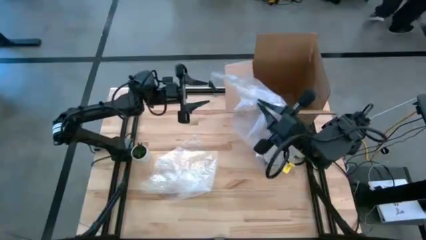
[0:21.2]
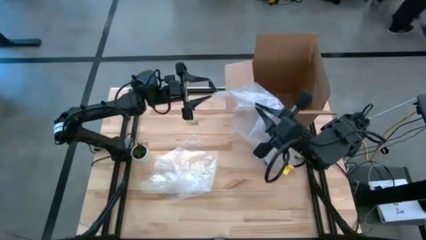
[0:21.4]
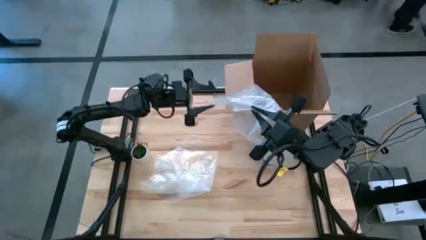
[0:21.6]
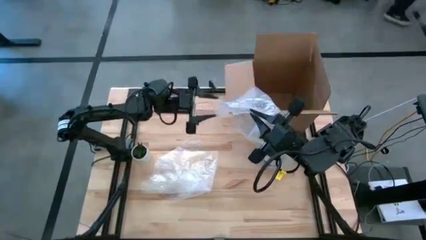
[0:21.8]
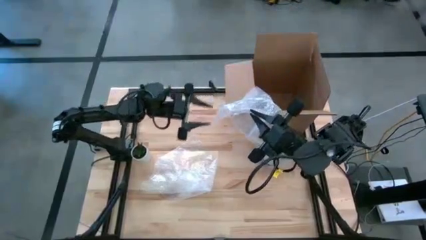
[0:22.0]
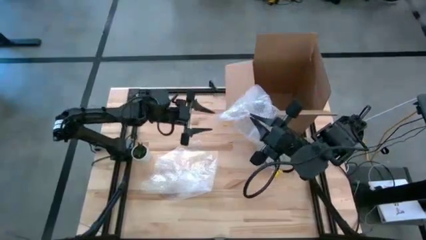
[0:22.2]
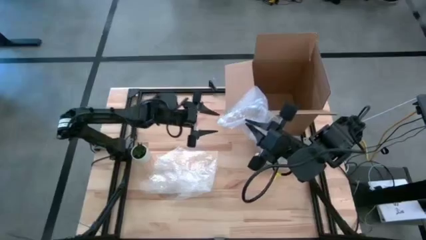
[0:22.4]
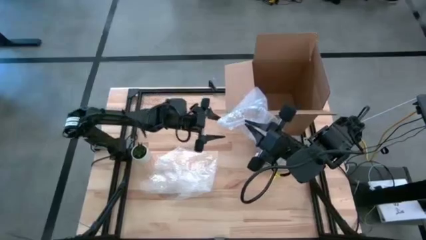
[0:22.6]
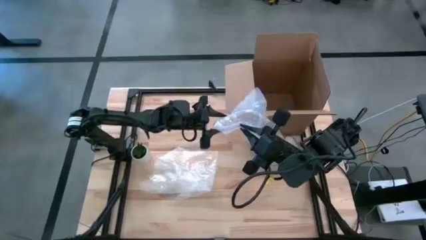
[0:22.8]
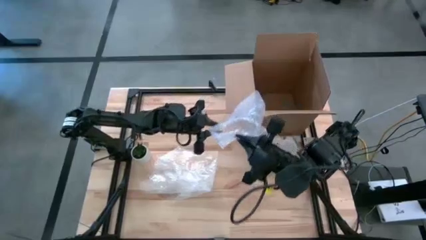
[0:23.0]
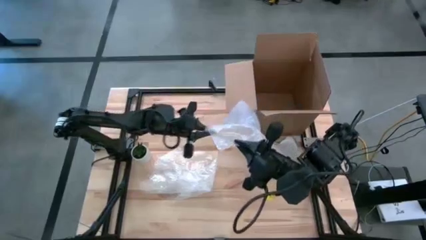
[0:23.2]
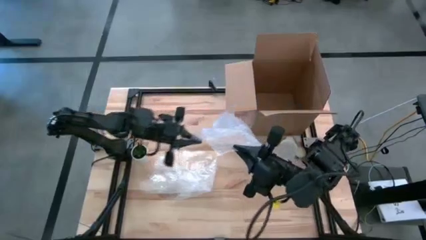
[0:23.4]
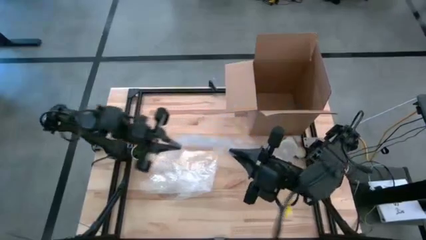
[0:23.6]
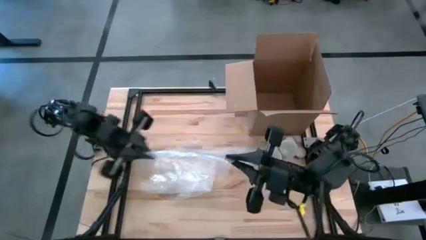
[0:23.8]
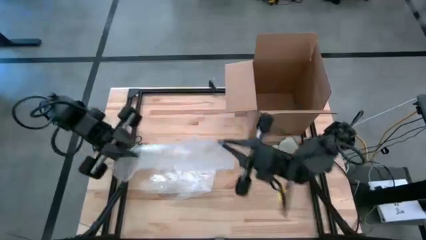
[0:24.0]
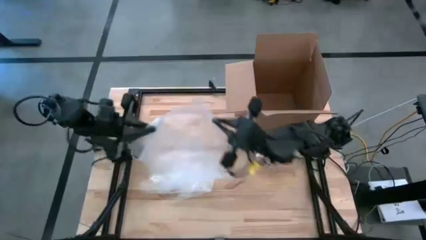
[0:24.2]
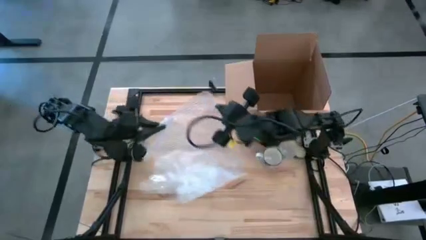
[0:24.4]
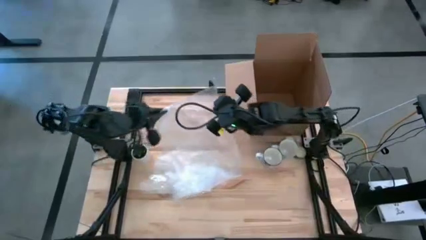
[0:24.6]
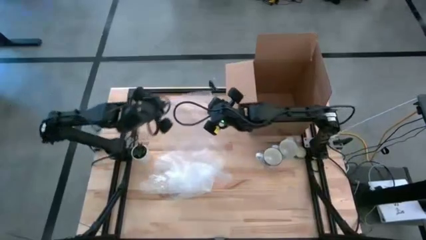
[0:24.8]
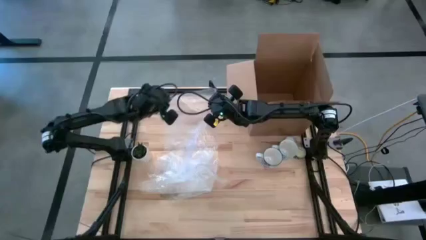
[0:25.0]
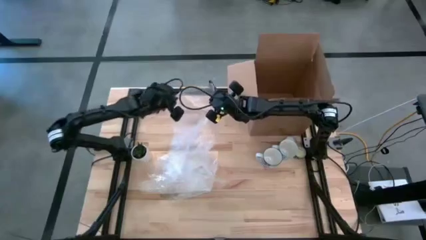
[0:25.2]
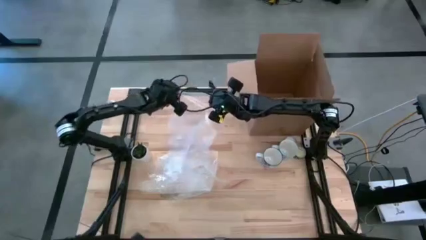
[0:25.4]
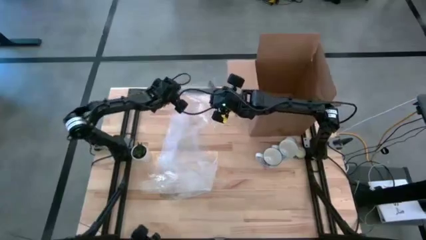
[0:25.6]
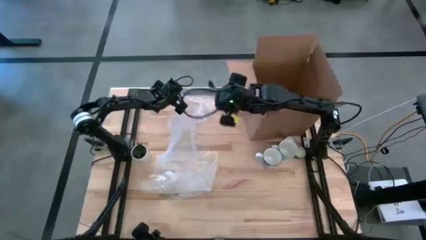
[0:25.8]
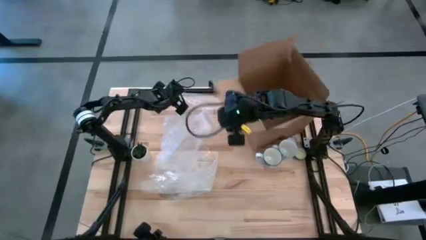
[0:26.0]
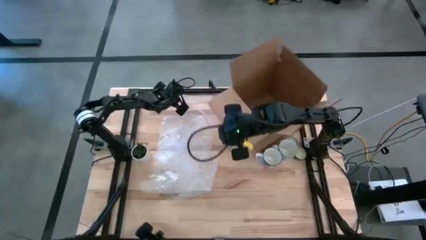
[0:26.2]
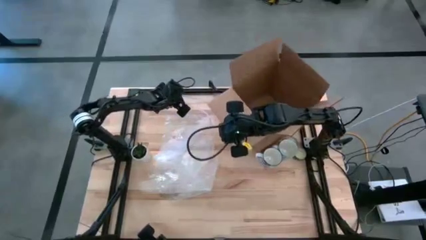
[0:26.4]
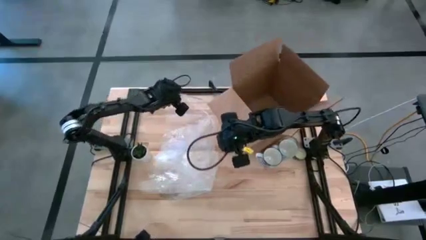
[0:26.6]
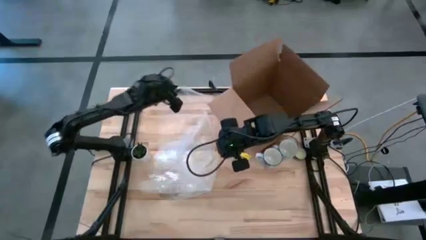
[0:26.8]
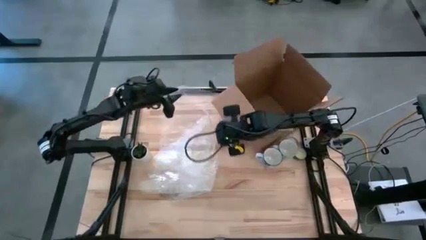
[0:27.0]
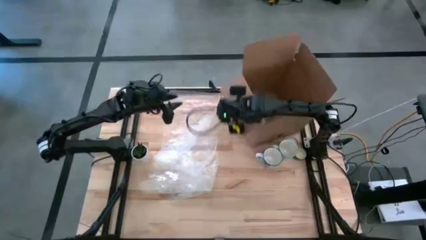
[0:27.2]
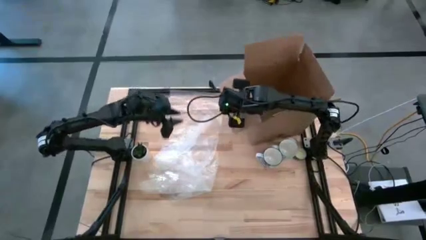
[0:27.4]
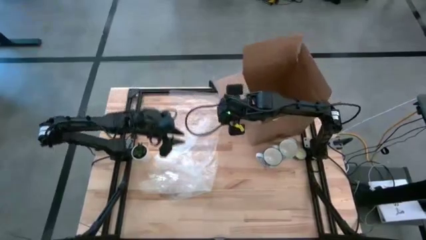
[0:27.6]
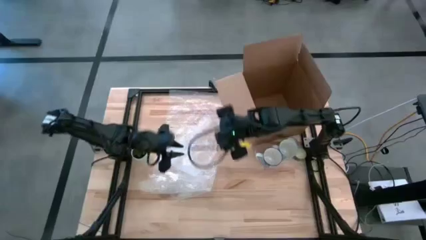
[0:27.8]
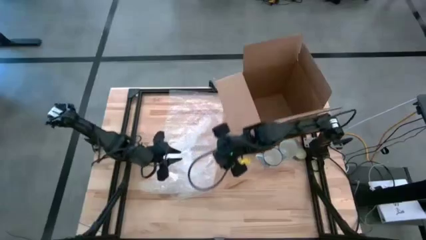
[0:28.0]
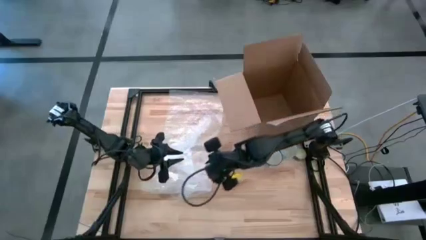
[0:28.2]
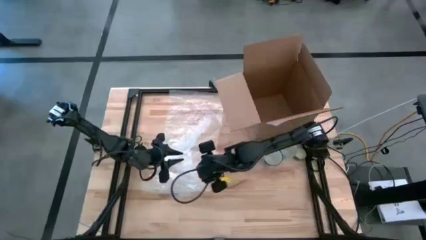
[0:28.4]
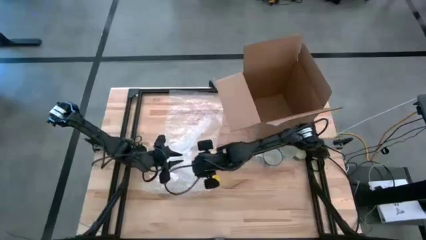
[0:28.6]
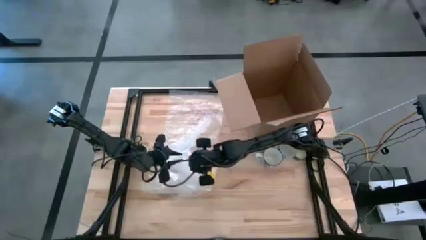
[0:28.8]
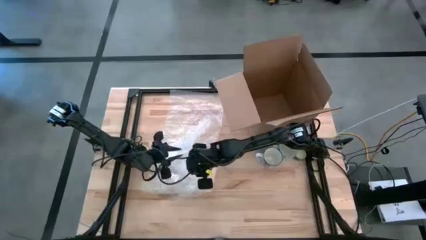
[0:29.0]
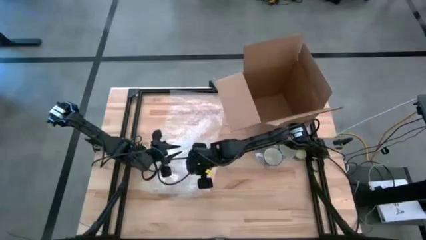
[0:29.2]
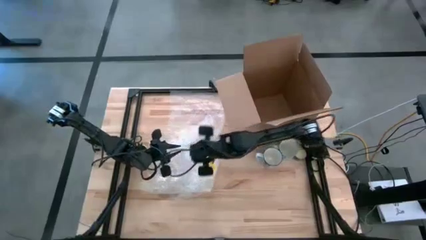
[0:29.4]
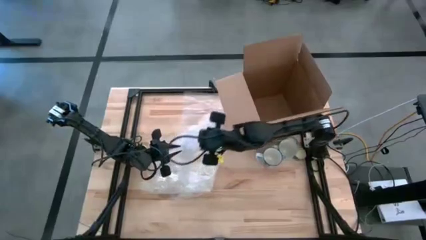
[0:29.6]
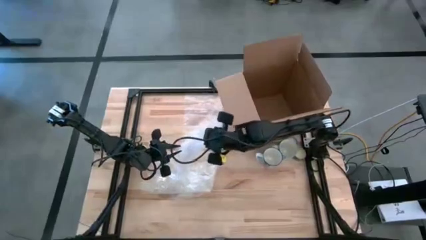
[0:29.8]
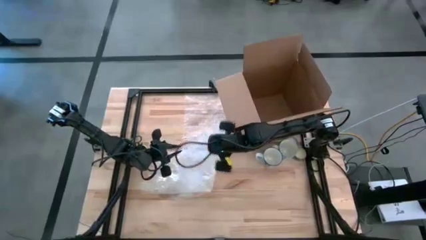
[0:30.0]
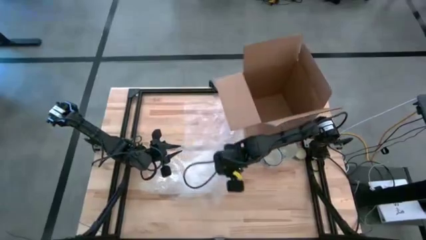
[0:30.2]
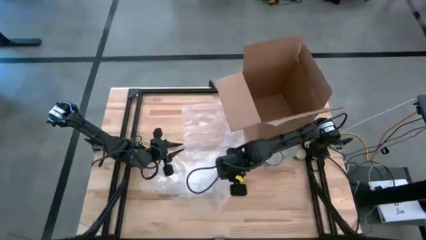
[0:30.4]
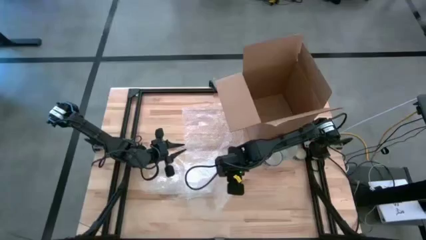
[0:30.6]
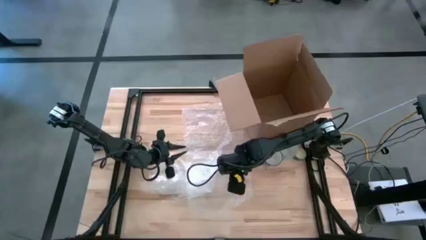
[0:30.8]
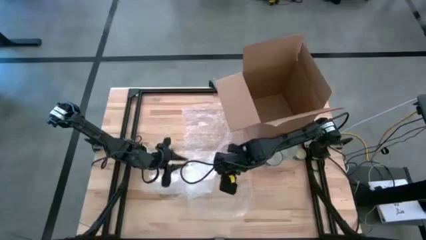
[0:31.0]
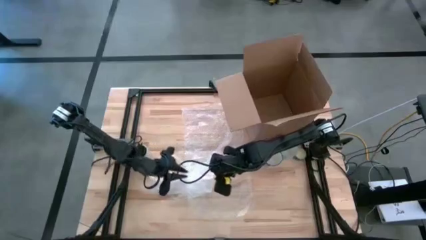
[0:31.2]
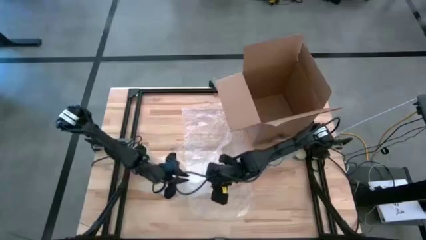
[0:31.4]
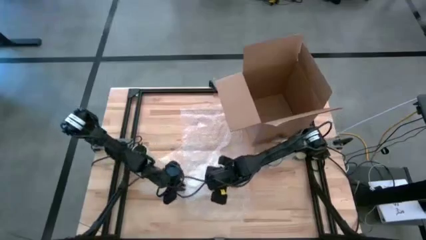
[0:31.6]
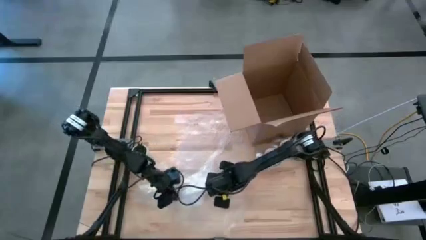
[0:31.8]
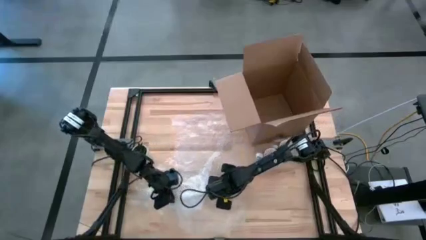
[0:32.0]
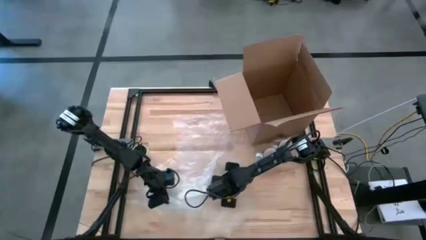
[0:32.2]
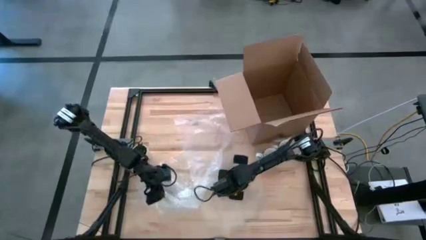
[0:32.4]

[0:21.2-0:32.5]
Task: wrap mug
Prepare the right bubble wrap

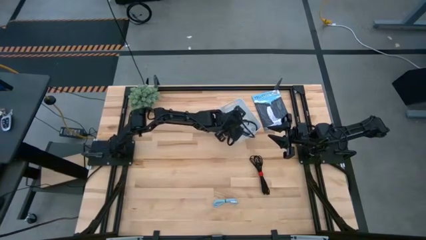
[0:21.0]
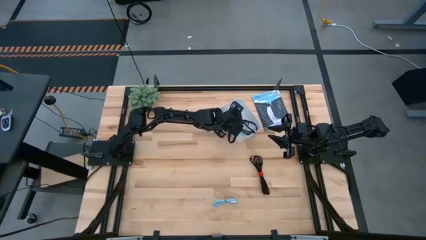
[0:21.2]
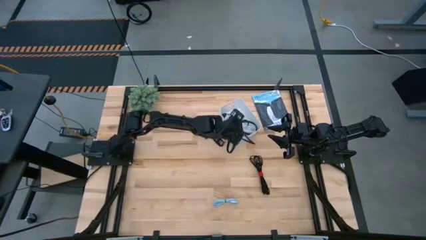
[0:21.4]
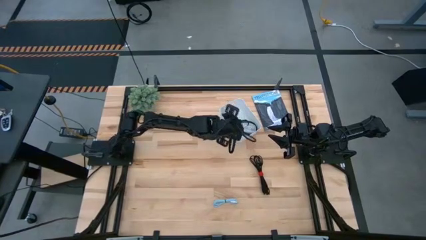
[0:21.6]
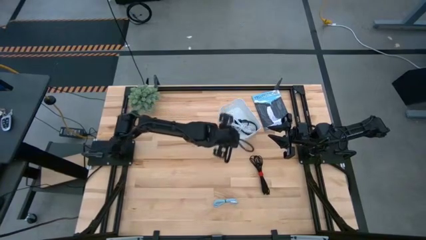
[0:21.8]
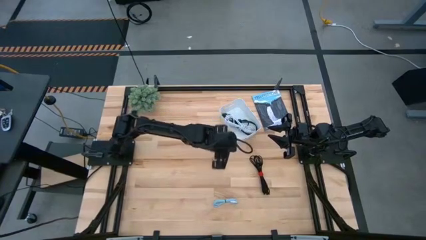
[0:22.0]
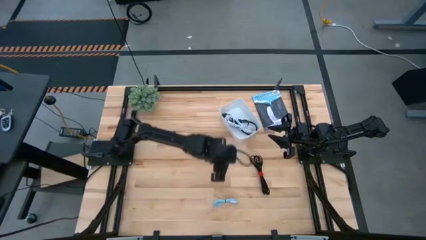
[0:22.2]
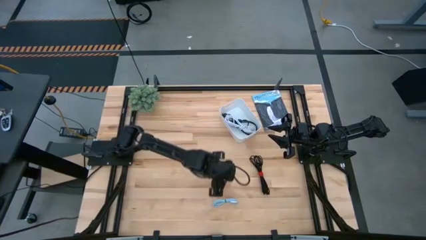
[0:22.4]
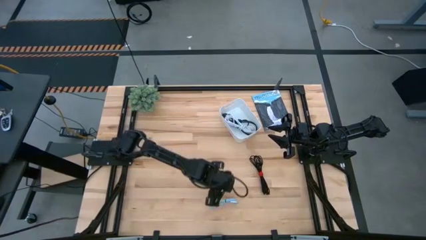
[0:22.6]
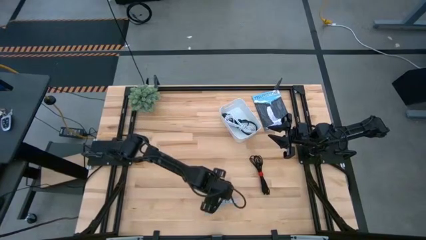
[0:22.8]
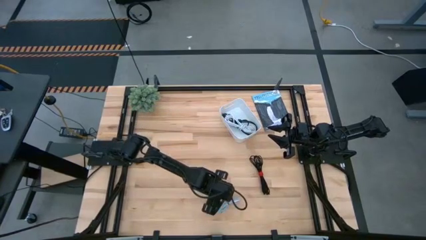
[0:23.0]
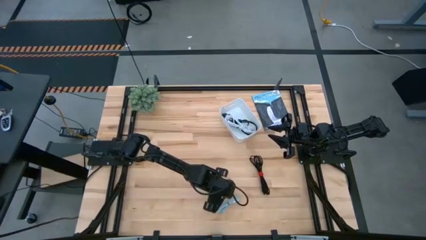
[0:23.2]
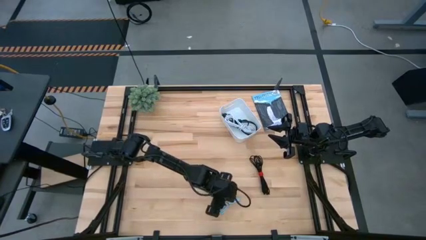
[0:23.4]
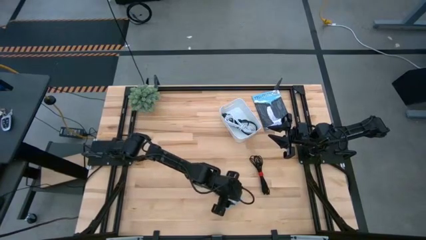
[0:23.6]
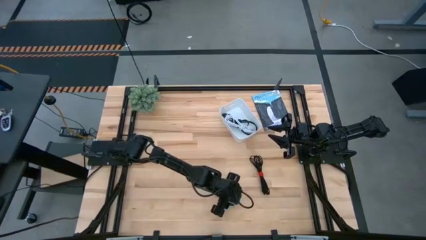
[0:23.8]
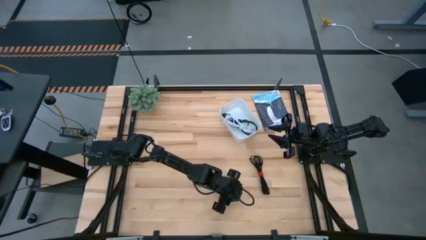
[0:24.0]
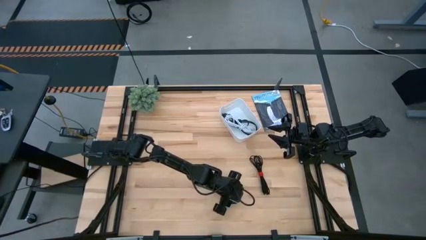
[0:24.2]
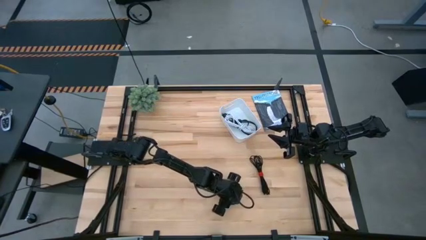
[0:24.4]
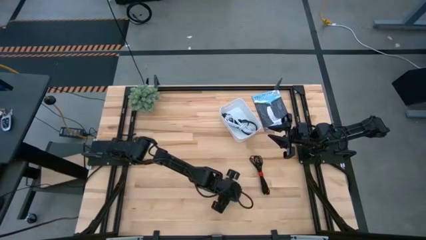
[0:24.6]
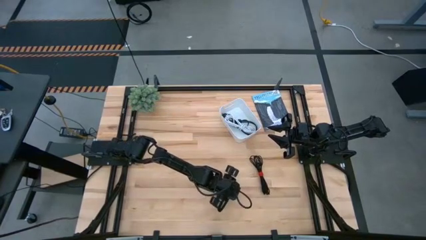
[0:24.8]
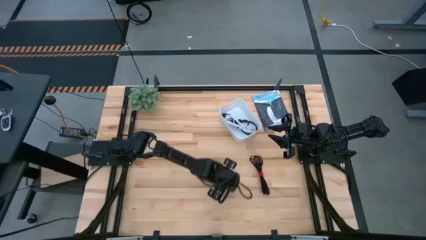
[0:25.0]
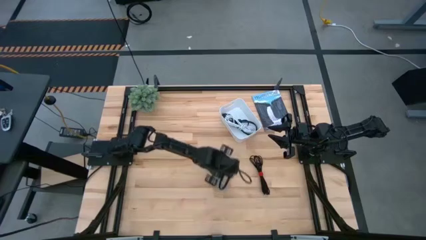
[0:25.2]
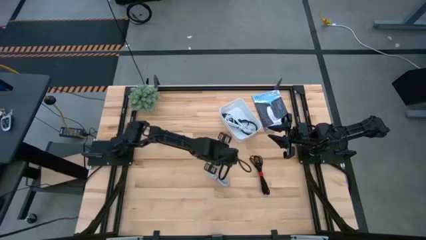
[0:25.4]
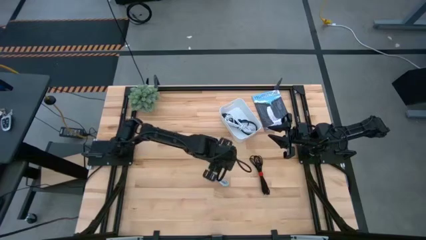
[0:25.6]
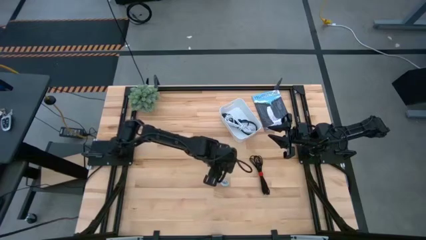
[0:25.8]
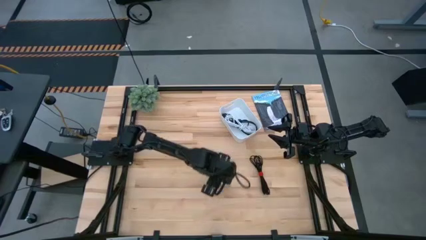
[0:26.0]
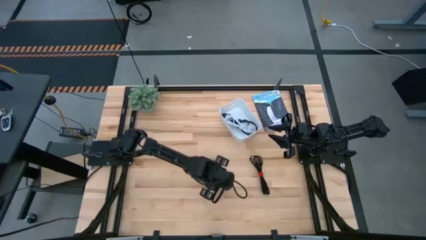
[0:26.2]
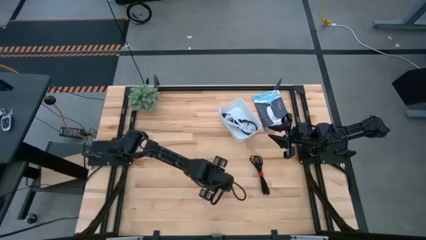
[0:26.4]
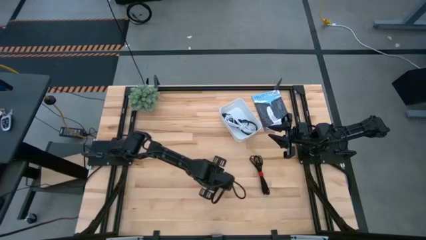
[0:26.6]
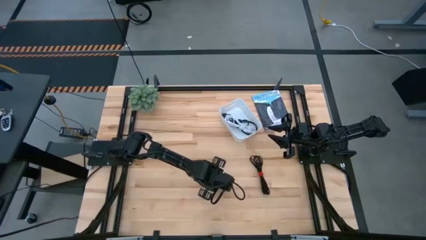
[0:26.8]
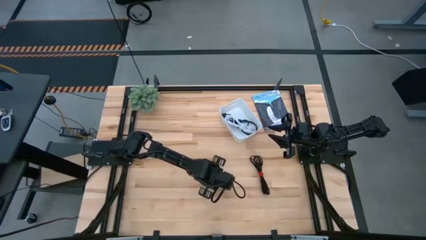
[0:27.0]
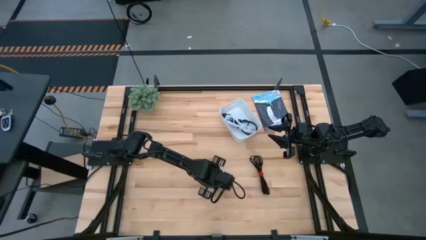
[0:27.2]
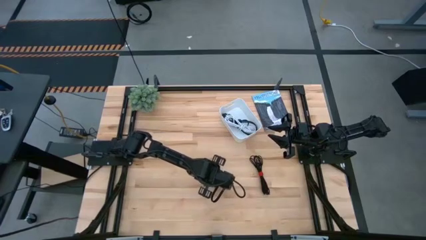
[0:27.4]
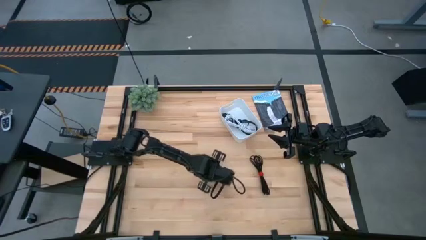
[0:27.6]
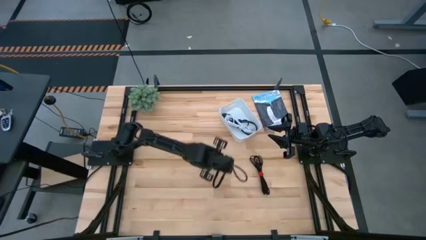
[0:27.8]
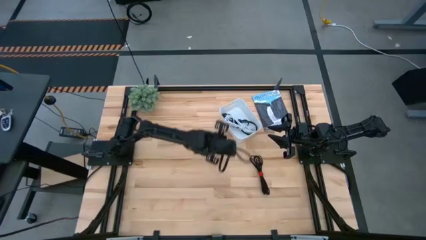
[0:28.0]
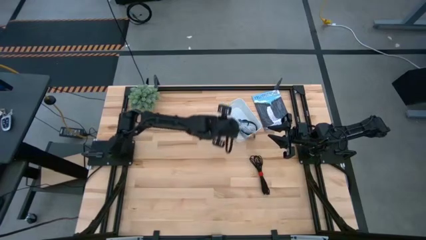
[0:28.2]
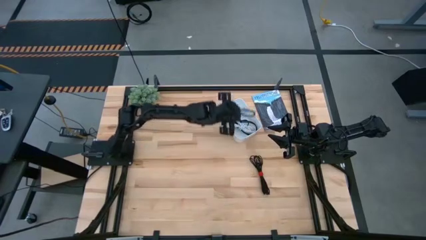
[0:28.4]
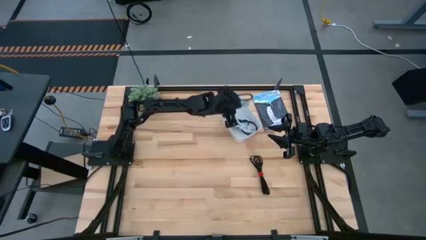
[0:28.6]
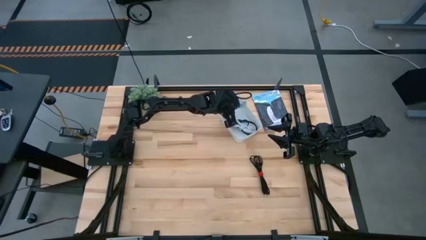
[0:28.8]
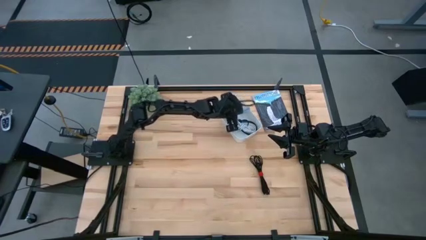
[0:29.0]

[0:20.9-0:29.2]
Task: Pick and place USB-C Cables
Put the light blue charger cable into the white bin
